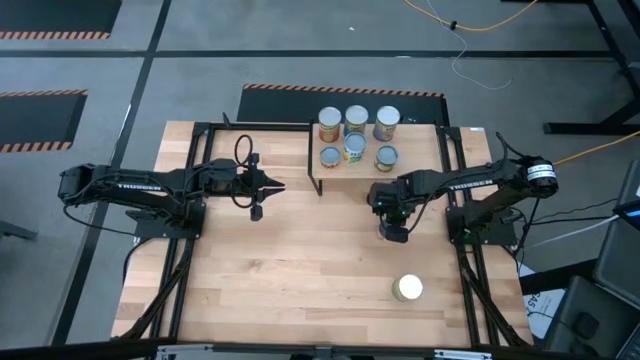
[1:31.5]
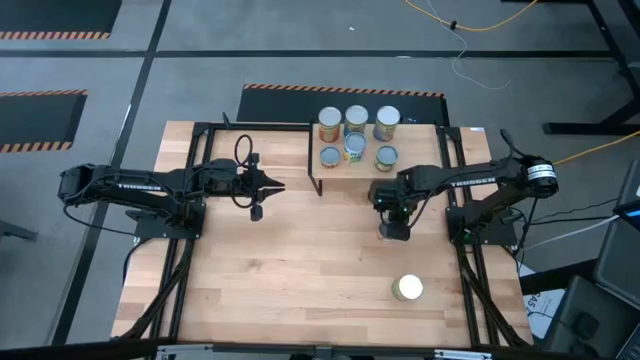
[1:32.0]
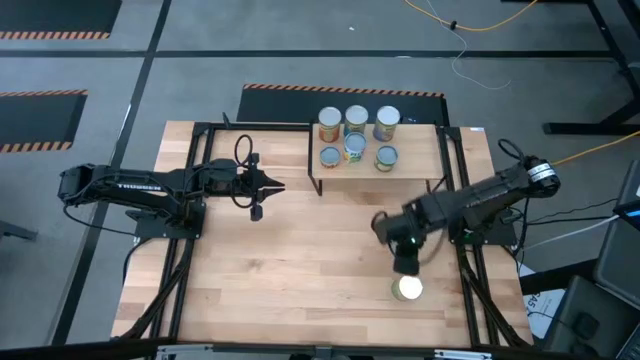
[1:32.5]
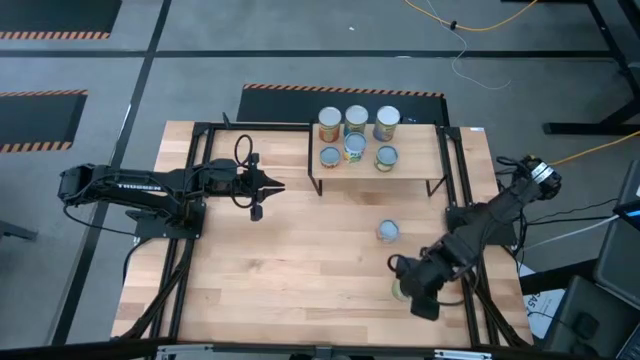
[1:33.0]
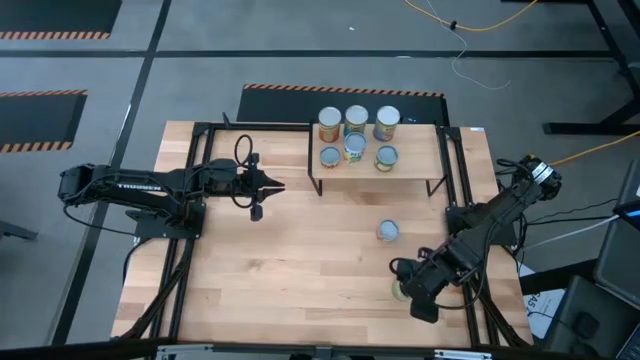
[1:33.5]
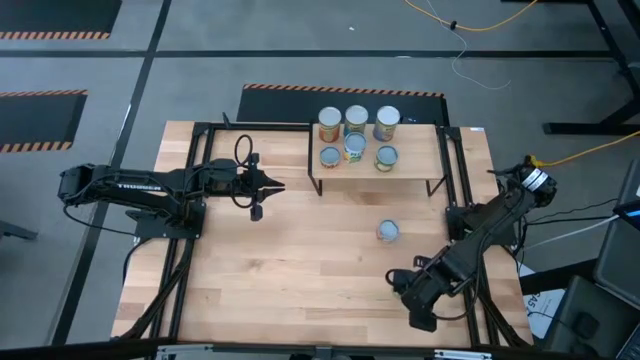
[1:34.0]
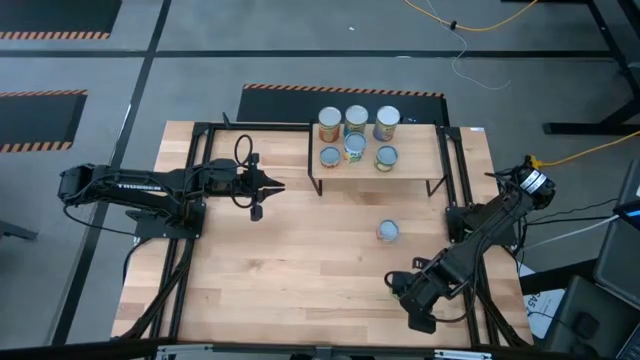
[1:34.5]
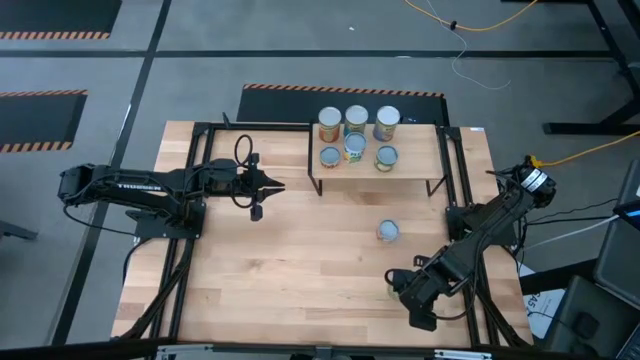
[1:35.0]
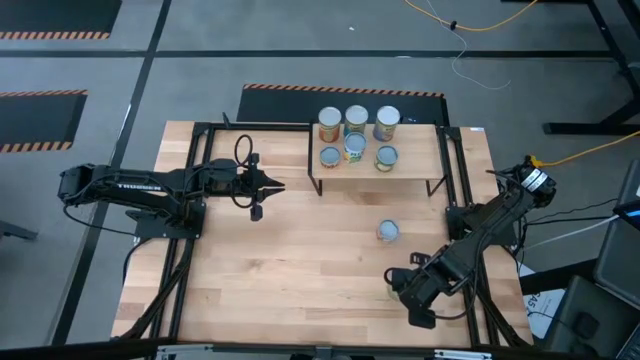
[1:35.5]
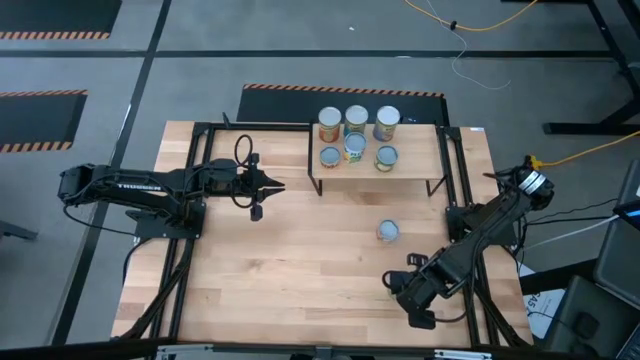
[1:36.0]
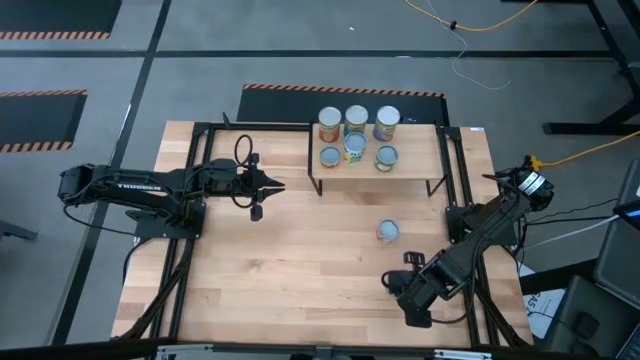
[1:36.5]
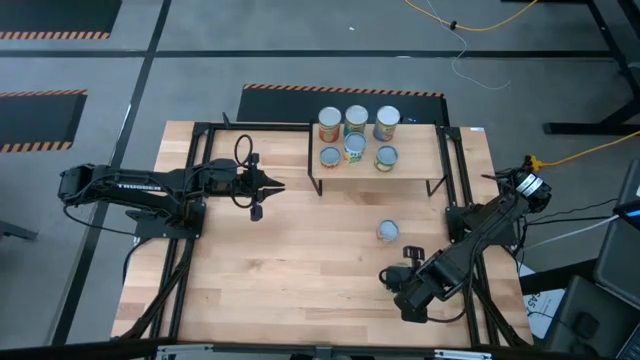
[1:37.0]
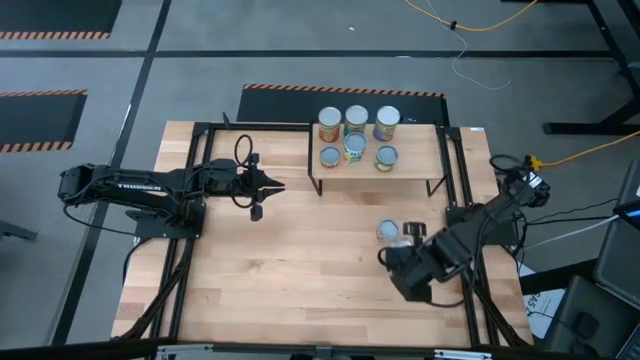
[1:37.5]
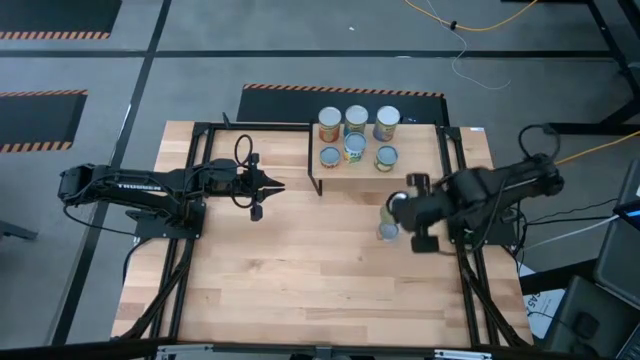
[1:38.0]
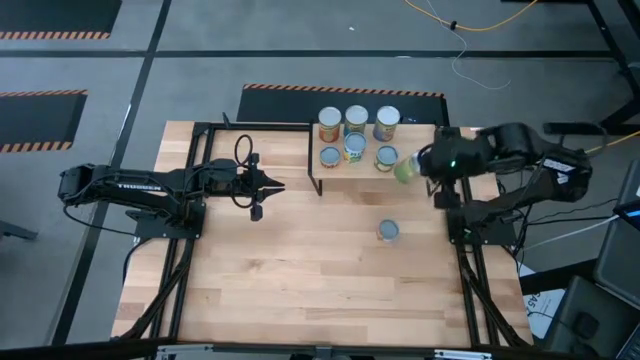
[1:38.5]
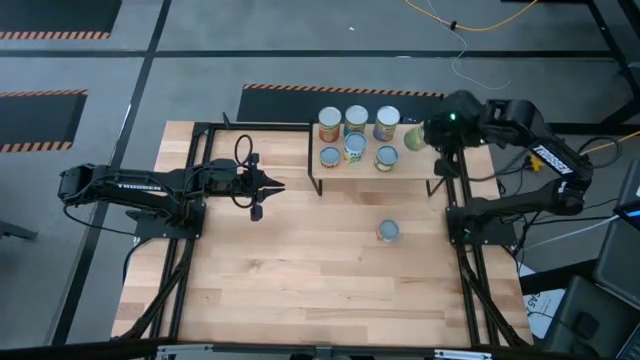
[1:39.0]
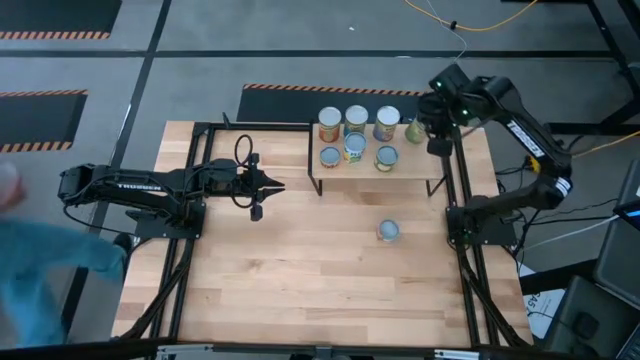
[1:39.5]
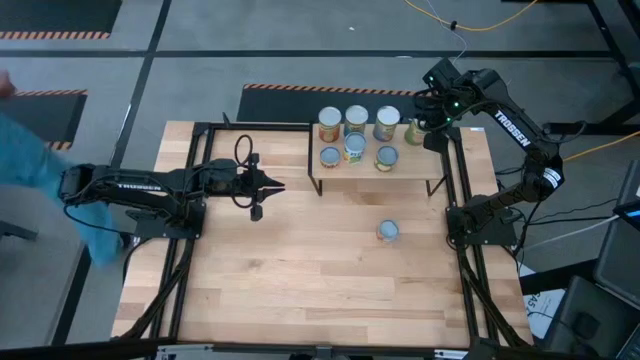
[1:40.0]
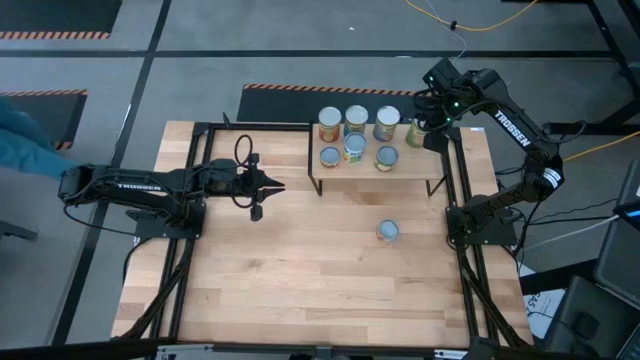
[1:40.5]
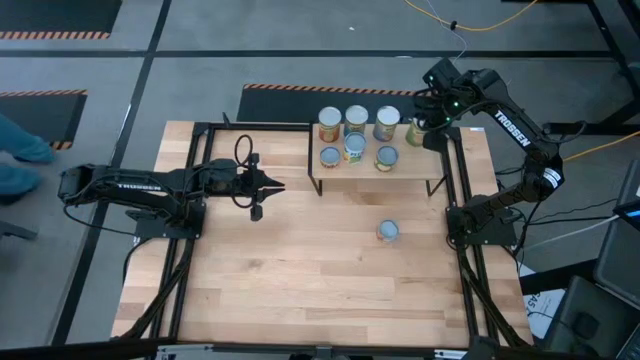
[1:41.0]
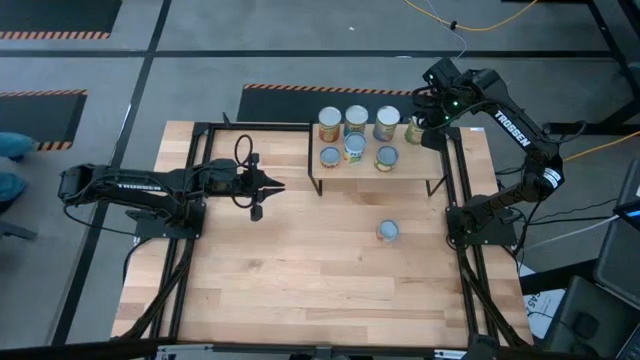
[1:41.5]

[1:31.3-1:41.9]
Task: Pick and place cans onto a shelf
Put the light green canned oranges on the shelf

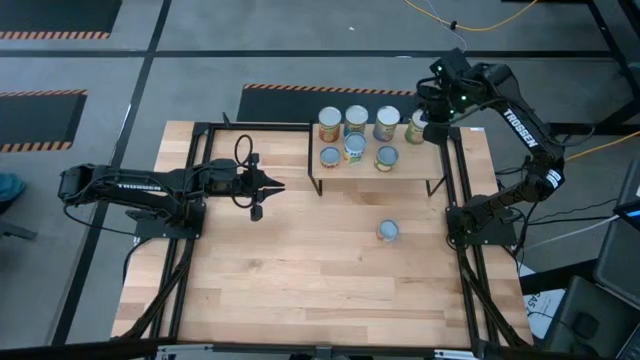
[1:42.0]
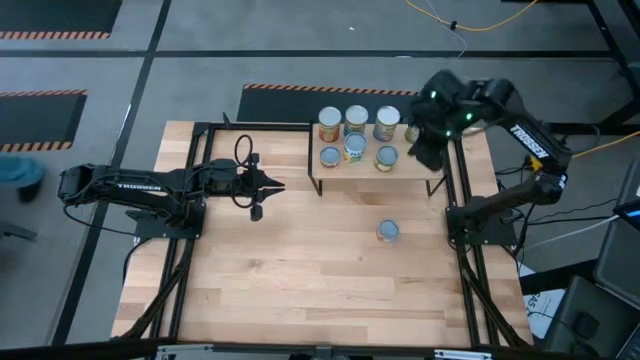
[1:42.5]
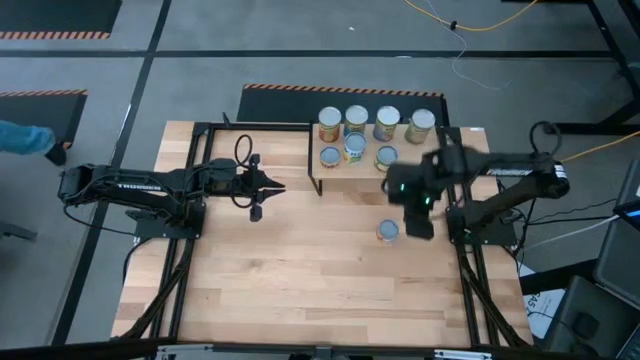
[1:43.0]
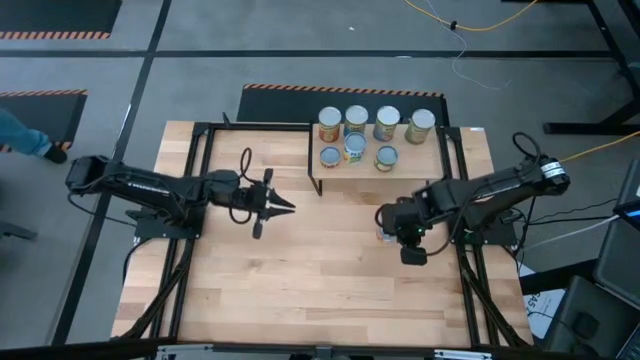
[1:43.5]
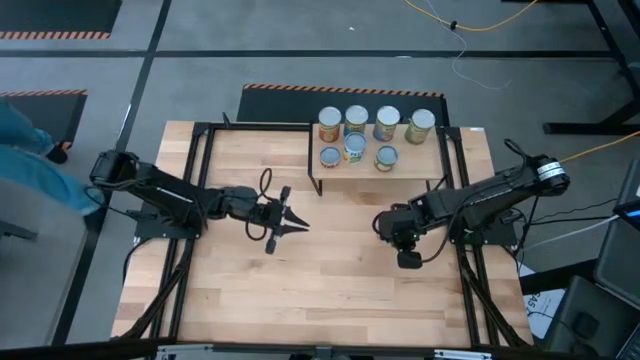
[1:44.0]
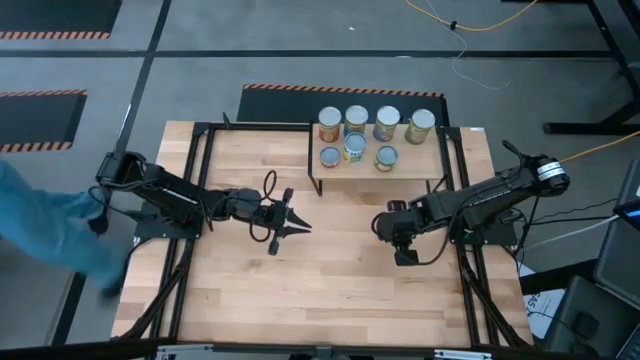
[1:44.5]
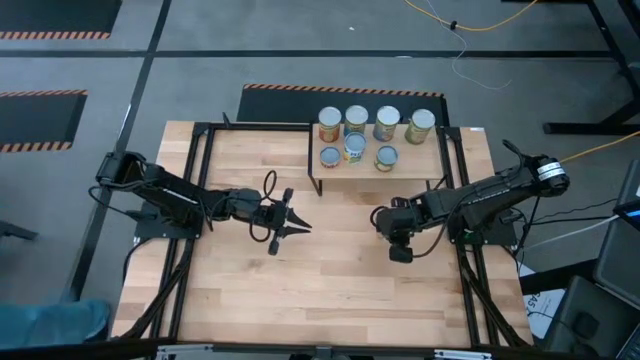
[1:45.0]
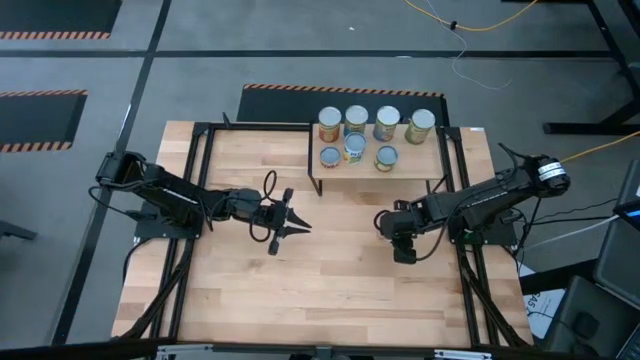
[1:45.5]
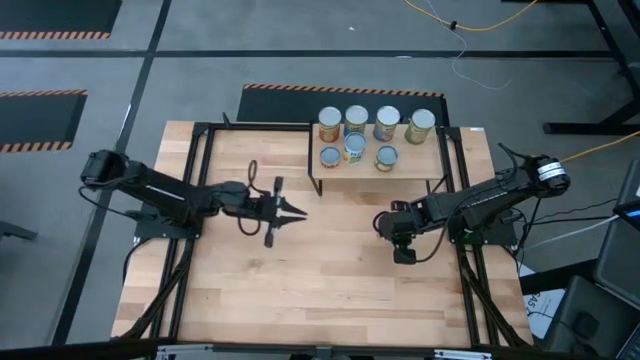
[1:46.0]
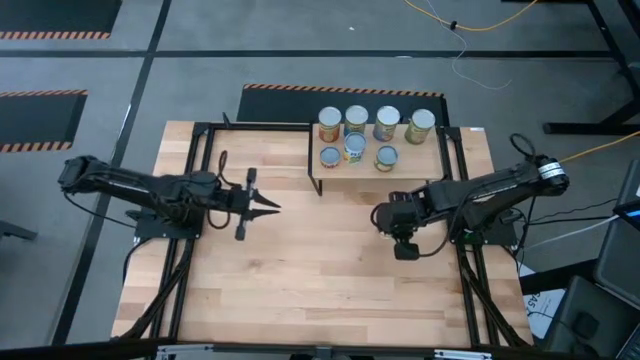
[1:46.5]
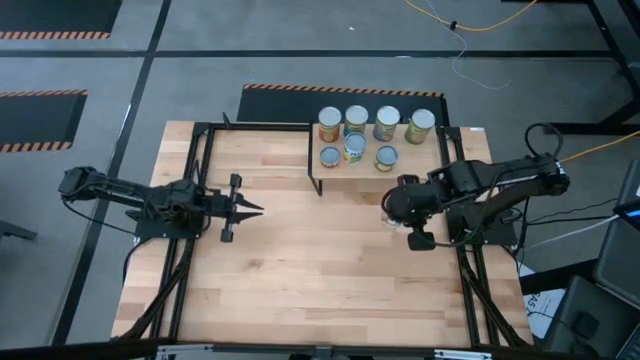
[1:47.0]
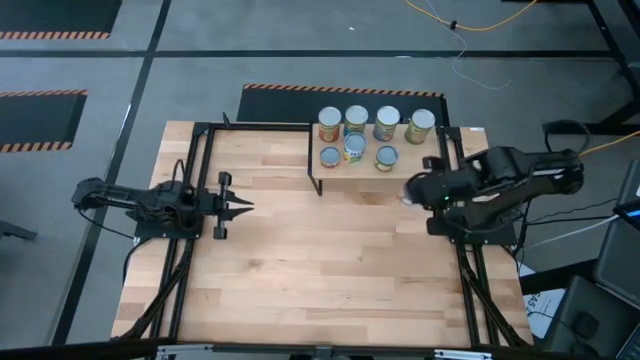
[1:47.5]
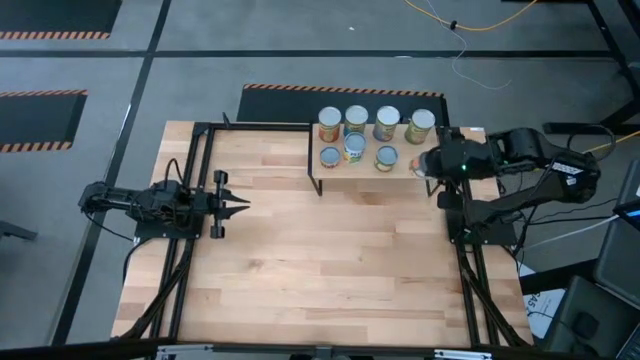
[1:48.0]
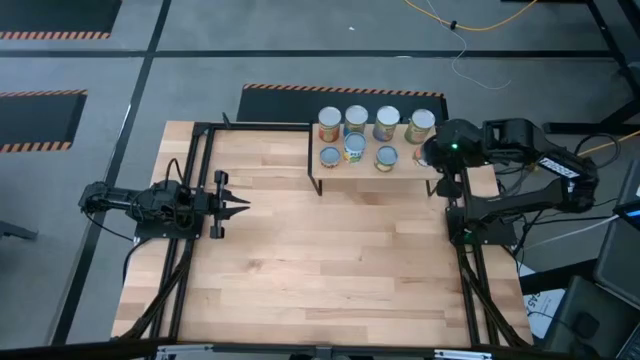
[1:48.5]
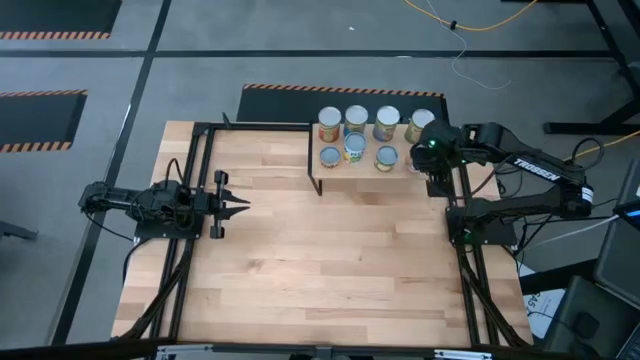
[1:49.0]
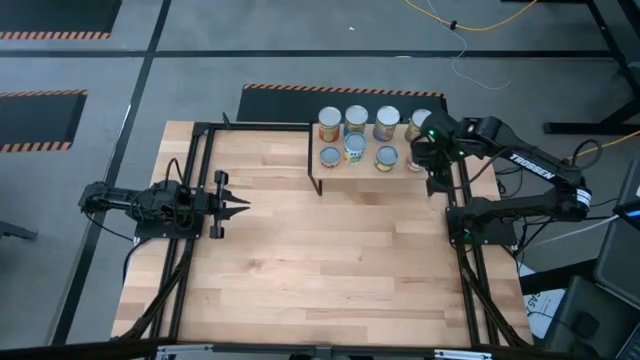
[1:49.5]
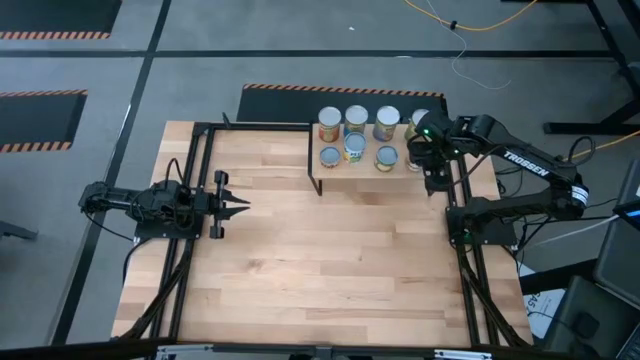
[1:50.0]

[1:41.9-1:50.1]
Put the green and orange canned oranges on the shelf

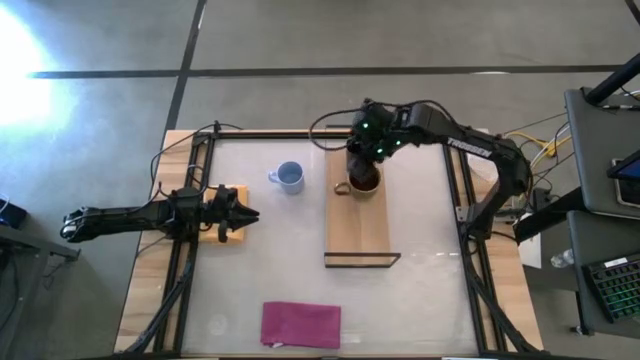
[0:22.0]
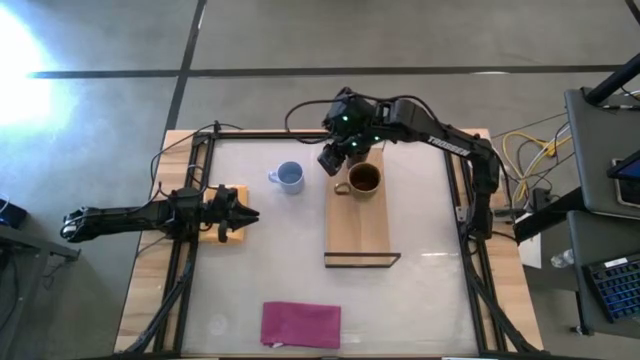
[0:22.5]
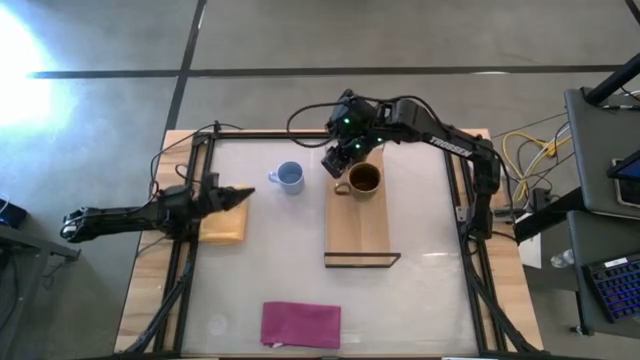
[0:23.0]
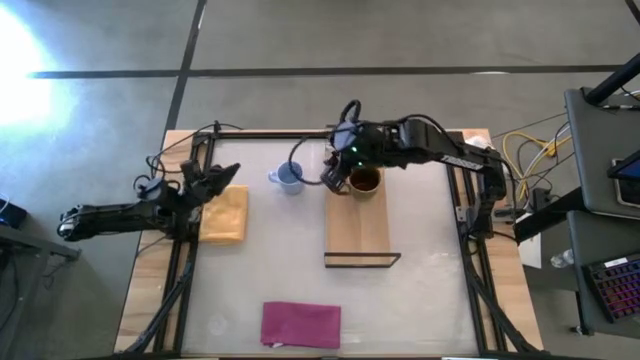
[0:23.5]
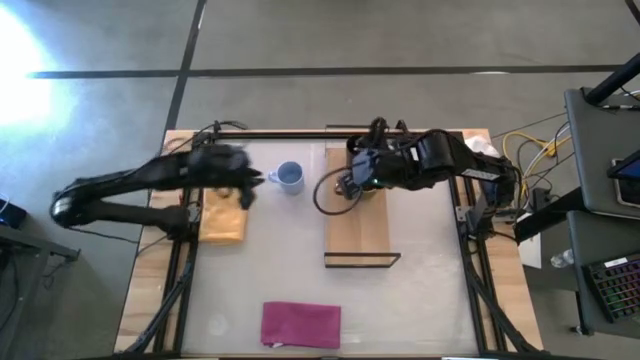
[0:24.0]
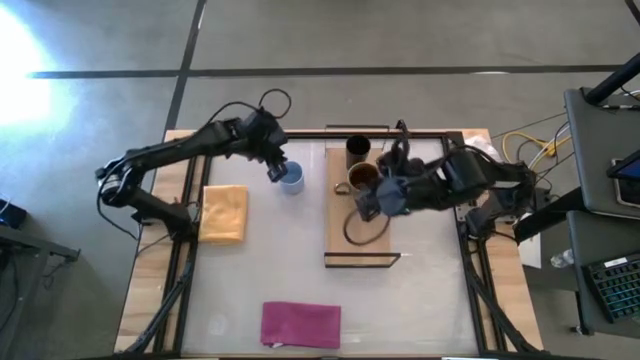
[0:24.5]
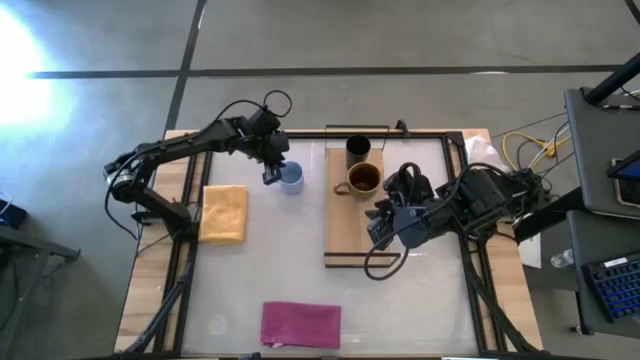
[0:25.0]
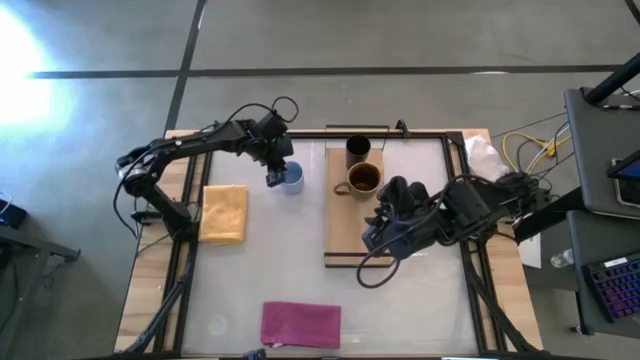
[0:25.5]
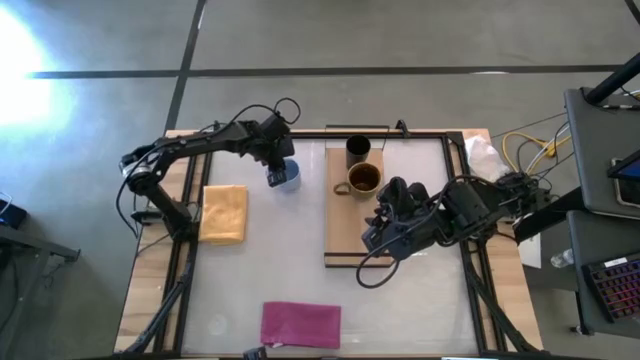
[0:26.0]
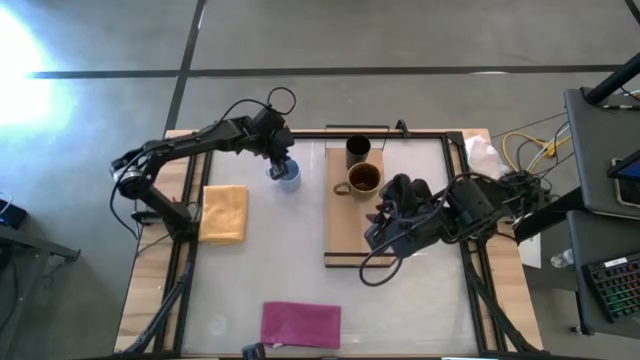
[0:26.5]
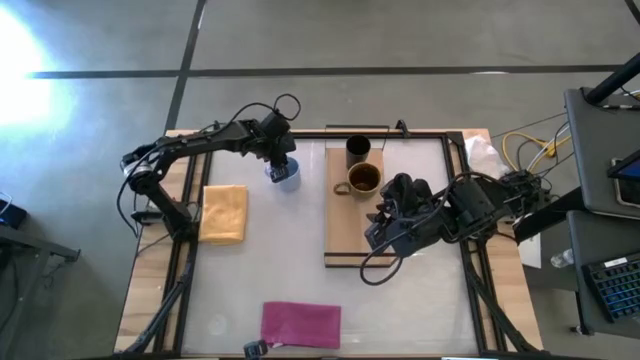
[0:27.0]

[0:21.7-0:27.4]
Task: Stack small to large cups/mugs on shelf
Put the blue mug on the shelf
